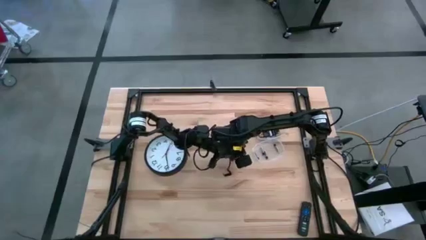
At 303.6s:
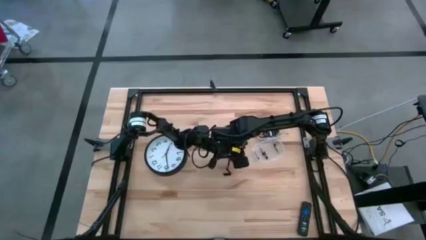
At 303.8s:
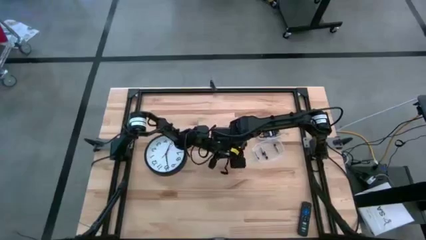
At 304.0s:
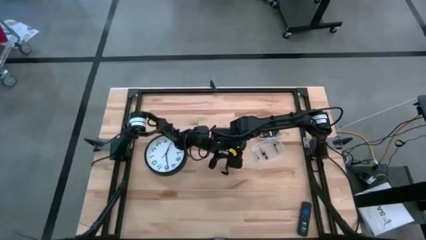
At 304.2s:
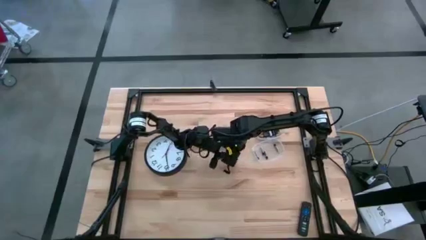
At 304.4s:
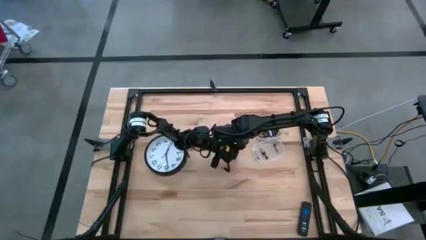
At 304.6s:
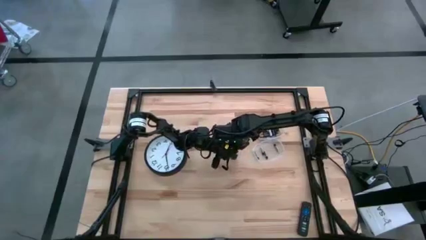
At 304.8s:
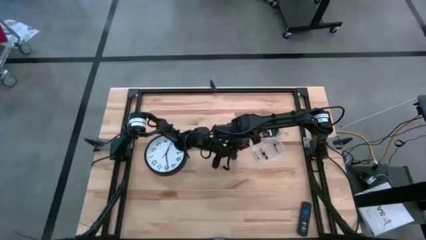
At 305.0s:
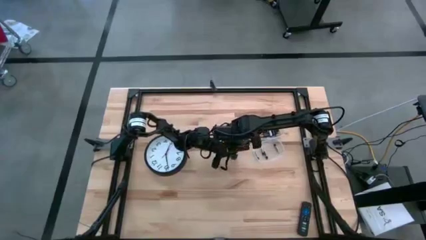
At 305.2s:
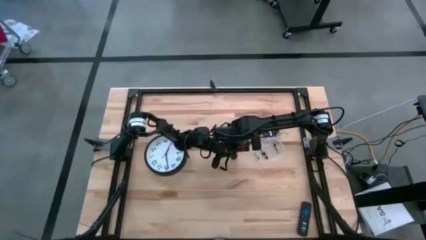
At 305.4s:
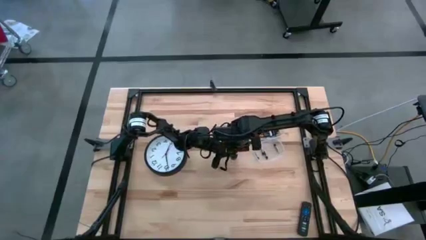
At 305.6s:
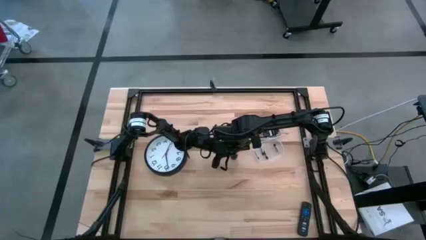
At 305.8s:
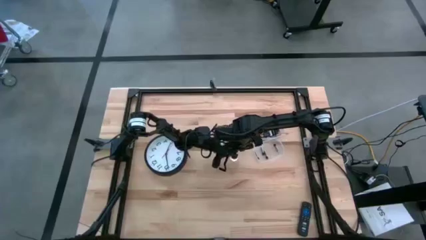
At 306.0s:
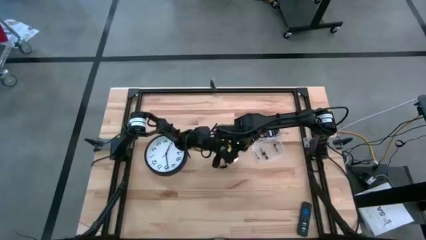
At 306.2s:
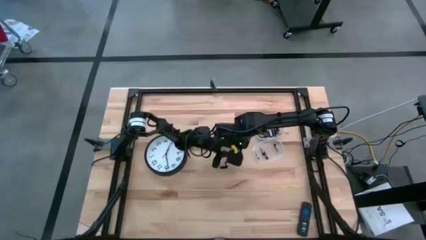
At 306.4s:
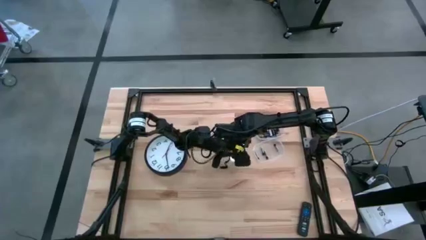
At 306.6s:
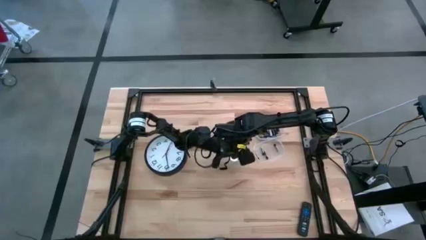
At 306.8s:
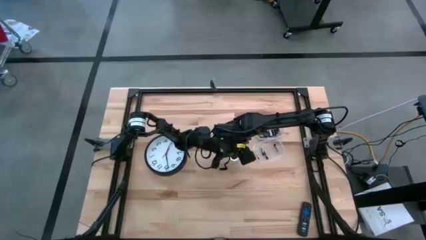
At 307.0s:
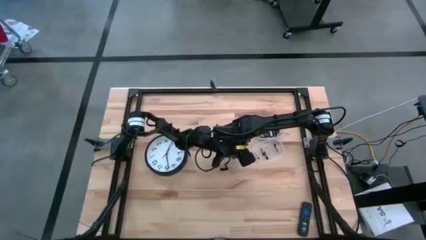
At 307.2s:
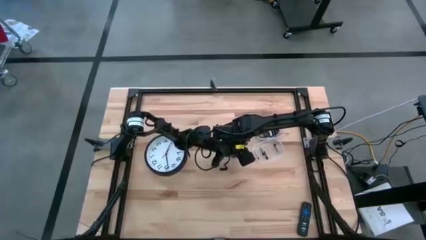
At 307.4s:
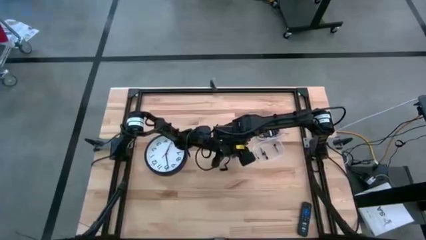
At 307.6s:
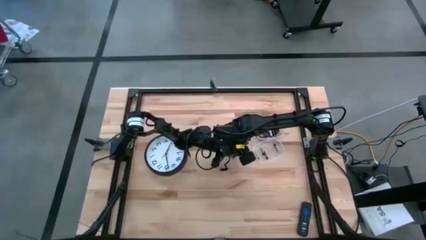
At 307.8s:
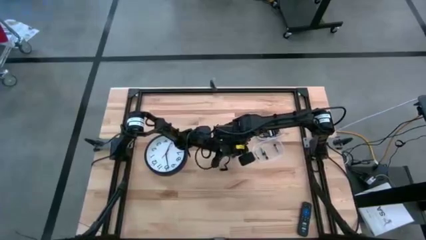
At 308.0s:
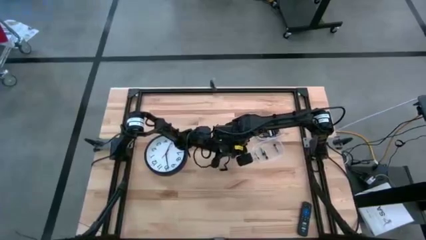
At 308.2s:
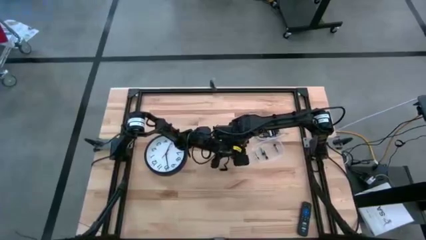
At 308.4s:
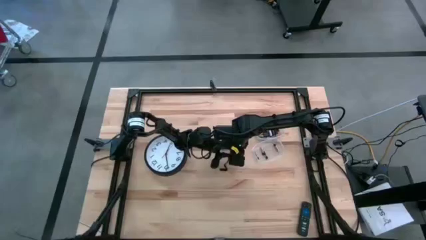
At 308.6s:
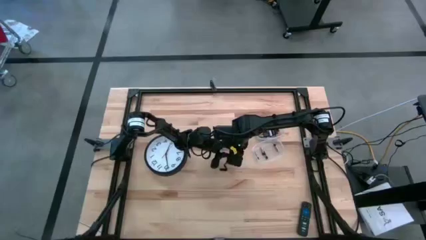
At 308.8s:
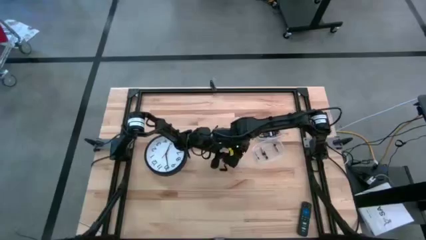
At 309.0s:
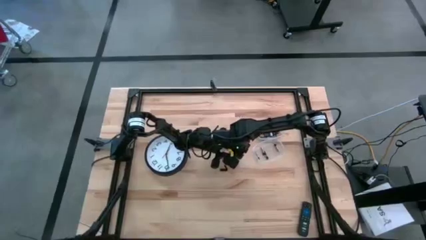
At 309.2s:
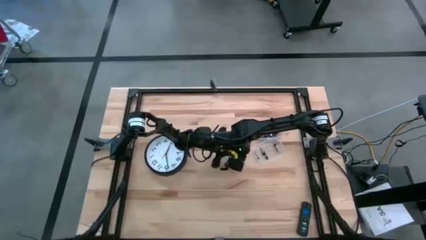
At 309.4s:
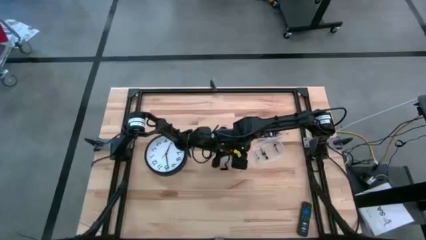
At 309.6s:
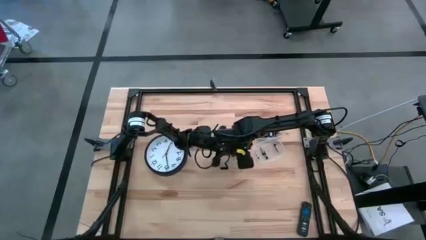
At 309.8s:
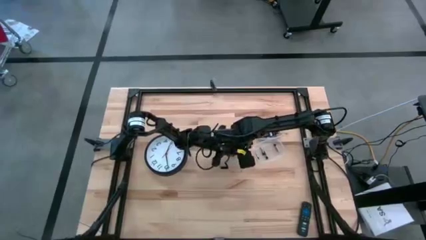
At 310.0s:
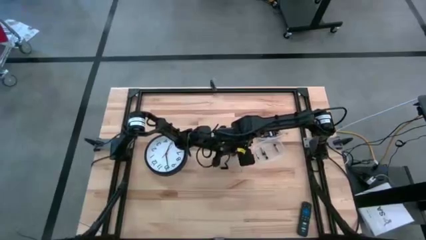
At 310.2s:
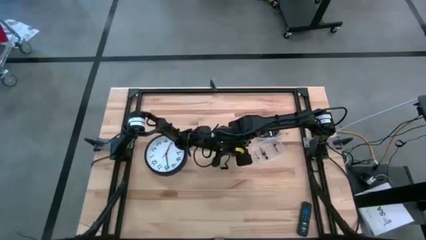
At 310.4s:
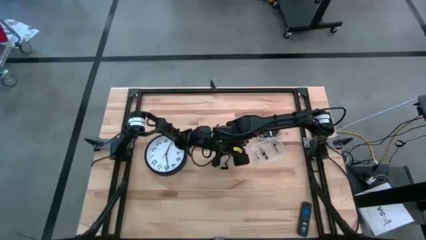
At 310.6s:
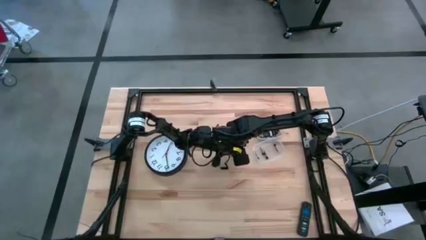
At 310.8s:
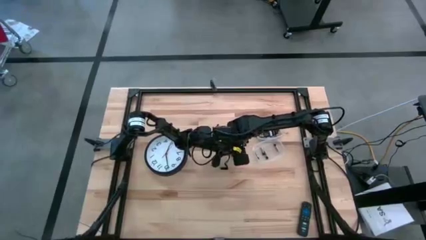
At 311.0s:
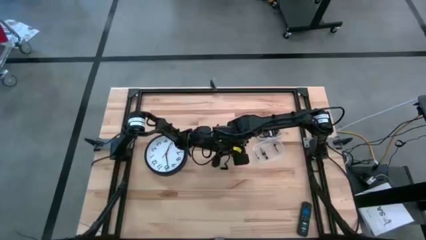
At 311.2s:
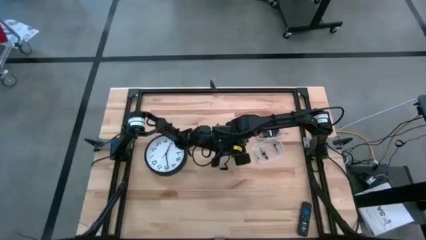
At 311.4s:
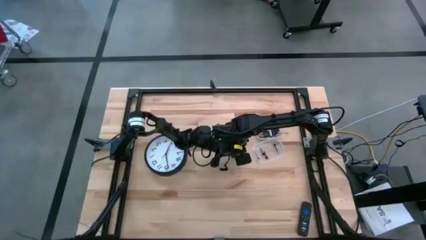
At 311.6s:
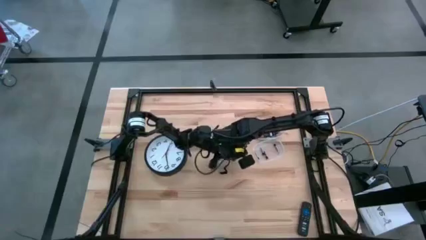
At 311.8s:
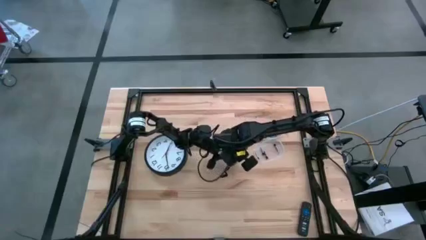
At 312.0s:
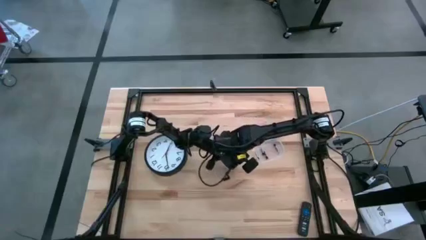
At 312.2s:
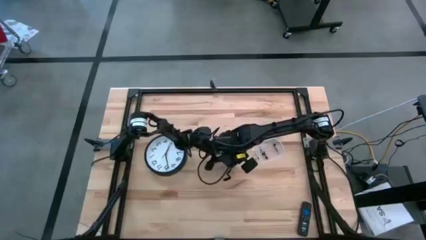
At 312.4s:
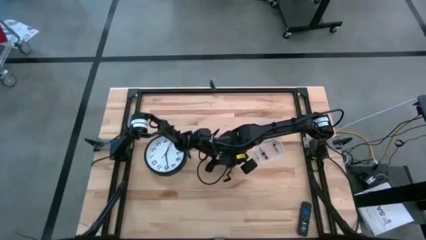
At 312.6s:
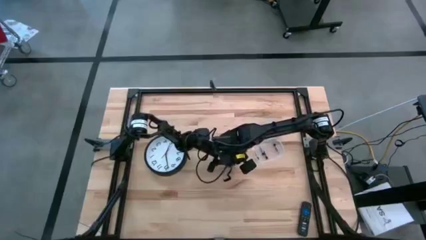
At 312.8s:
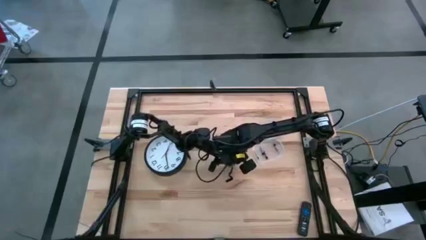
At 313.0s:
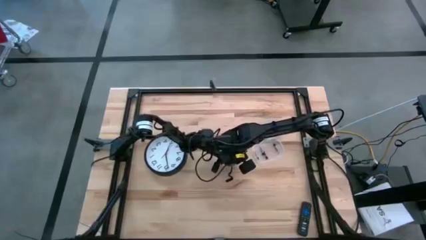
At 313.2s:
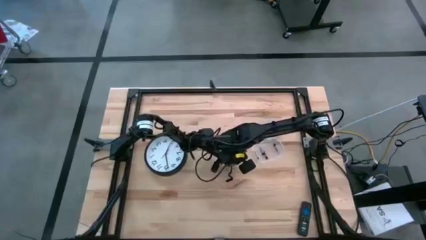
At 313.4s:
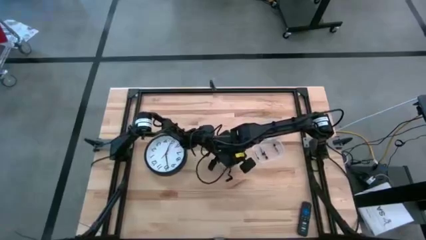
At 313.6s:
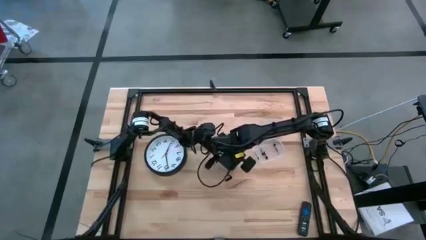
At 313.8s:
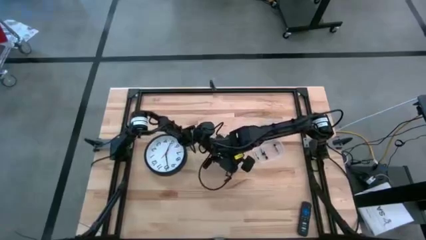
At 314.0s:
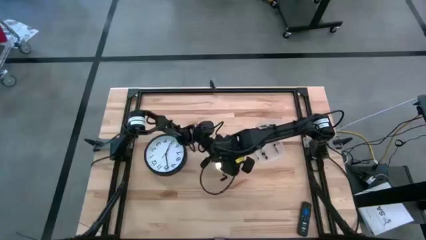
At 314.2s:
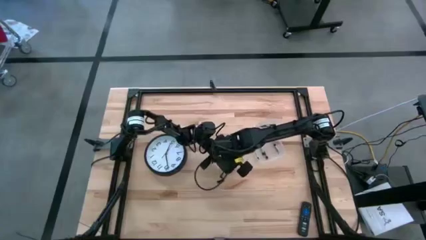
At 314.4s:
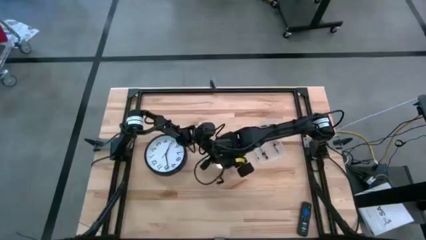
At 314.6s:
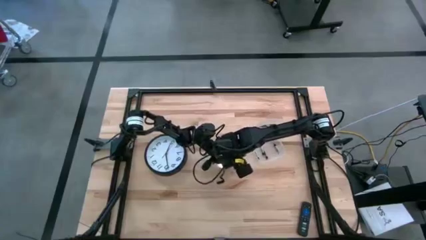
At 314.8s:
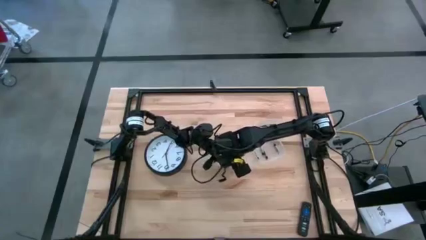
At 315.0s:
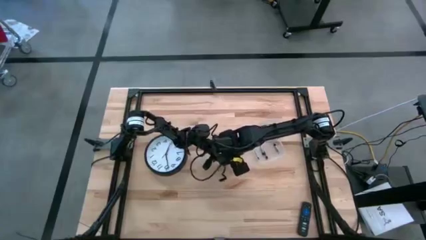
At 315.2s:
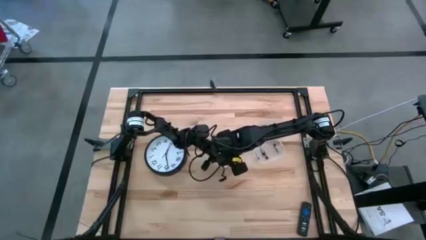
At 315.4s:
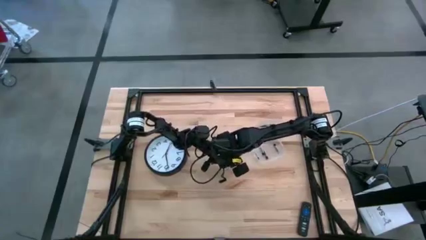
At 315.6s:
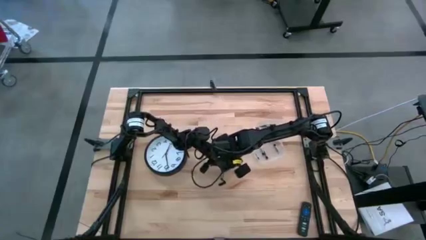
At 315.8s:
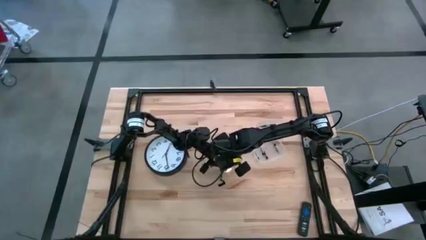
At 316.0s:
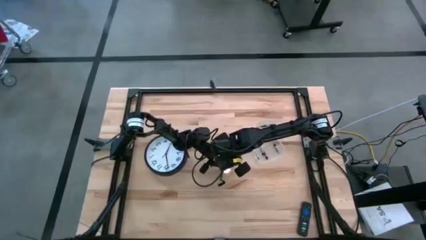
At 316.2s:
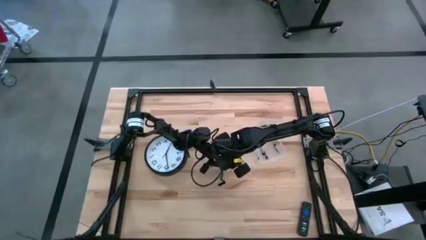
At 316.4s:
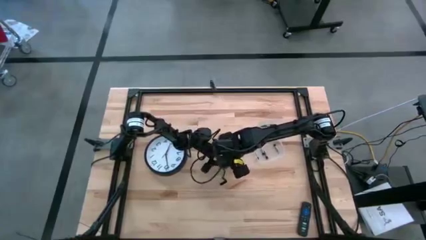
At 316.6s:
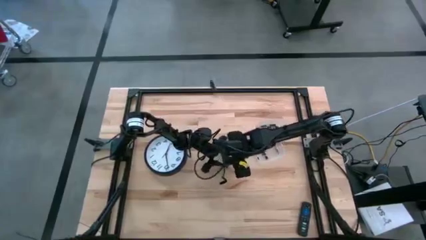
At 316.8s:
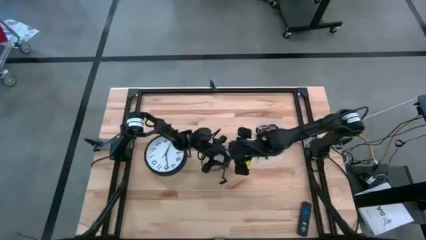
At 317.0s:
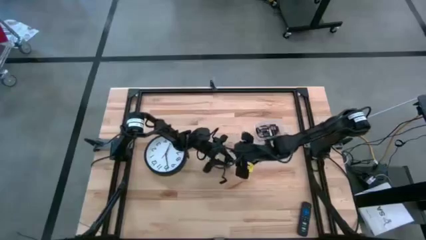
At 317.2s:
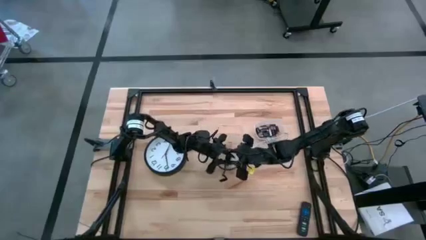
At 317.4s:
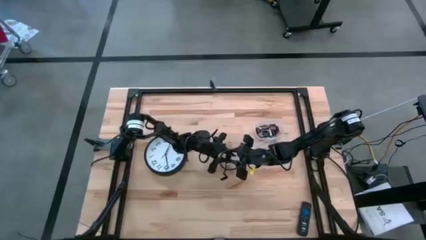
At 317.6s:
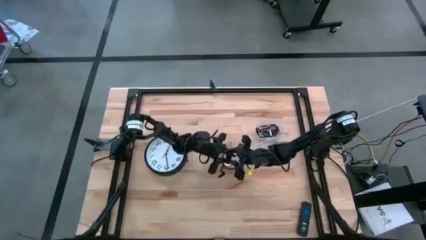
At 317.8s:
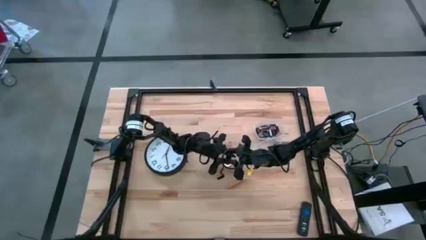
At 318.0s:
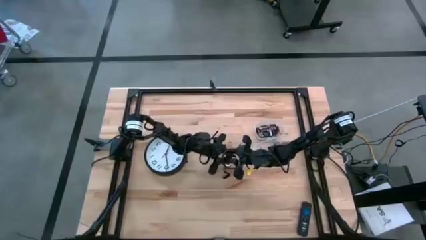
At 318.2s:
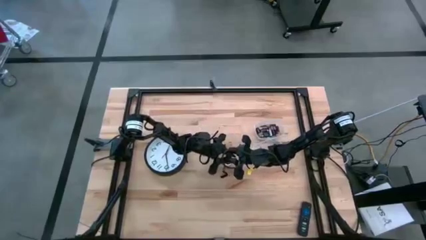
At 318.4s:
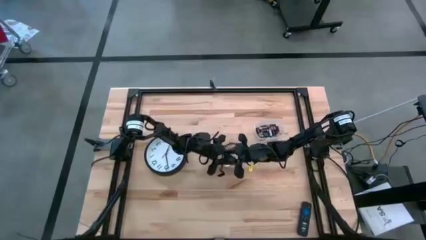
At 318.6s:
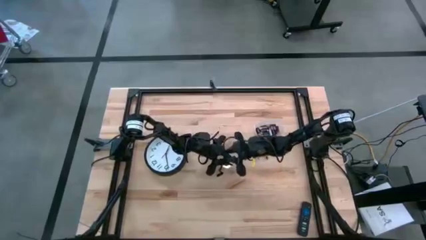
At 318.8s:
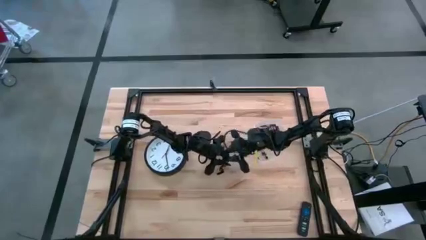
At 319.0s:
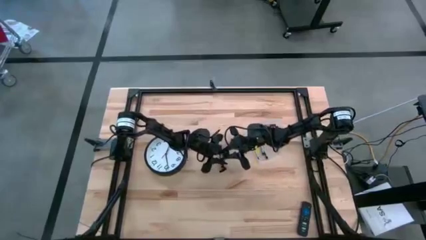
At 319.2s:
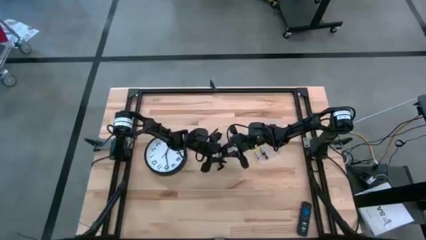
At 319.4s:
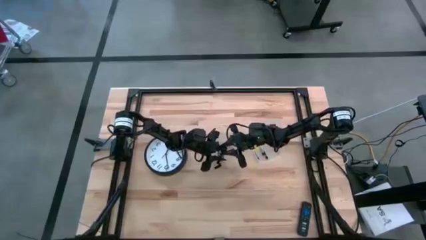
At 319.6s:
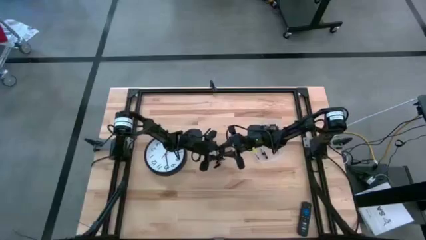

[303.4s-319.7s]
Task: Insert battery
Close the black battery compartment
